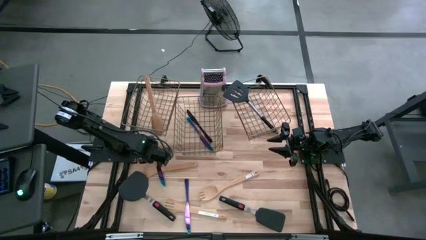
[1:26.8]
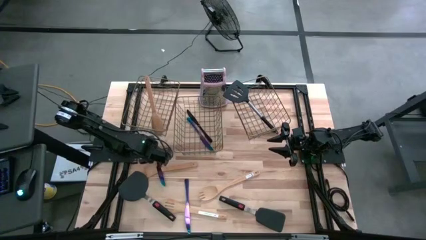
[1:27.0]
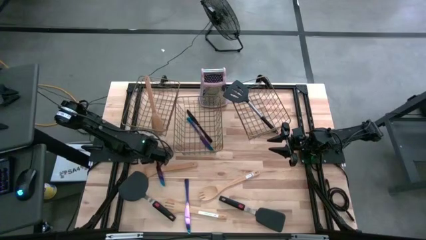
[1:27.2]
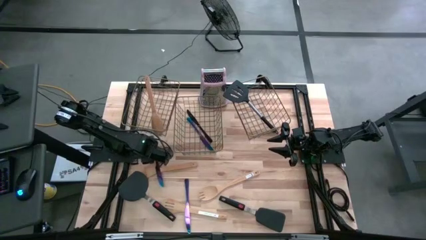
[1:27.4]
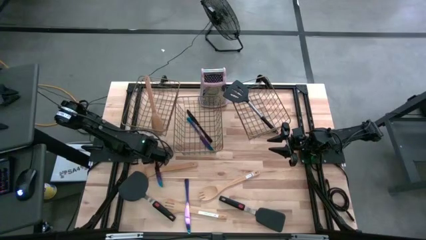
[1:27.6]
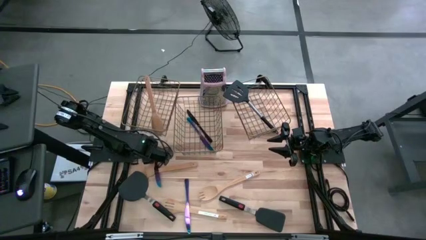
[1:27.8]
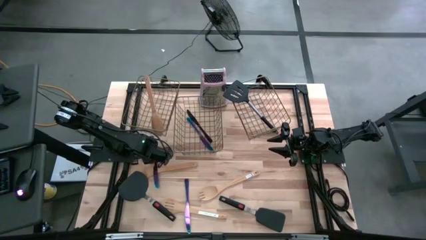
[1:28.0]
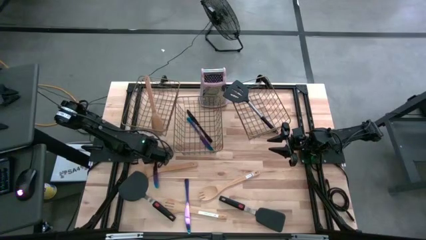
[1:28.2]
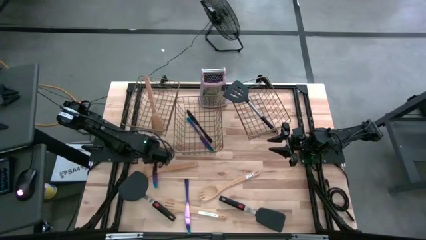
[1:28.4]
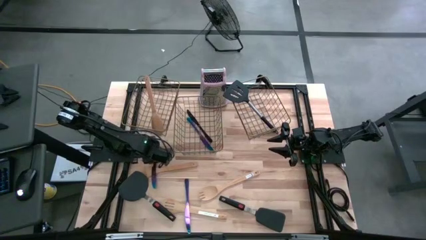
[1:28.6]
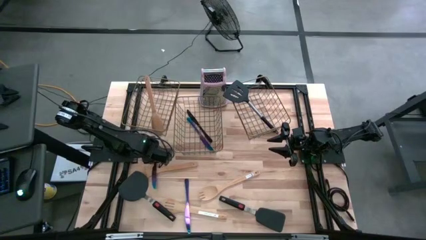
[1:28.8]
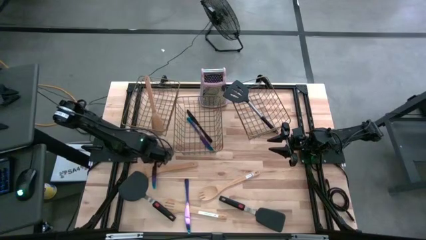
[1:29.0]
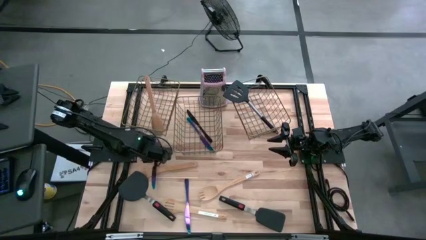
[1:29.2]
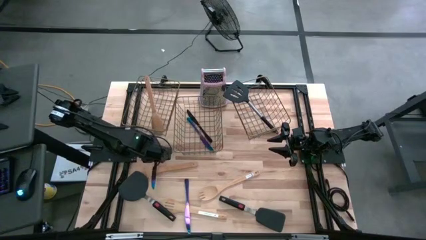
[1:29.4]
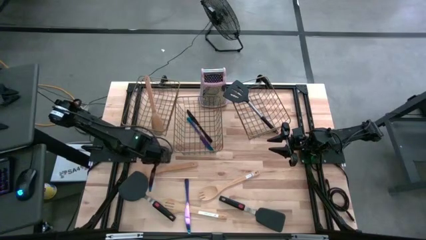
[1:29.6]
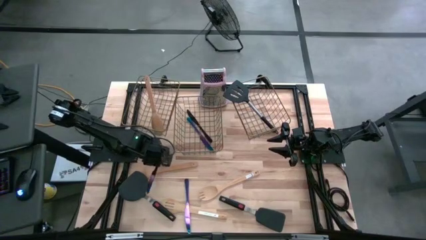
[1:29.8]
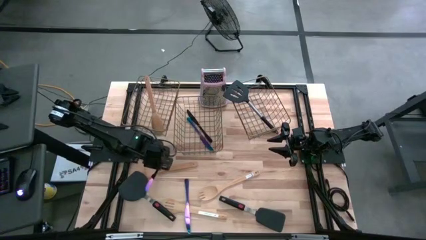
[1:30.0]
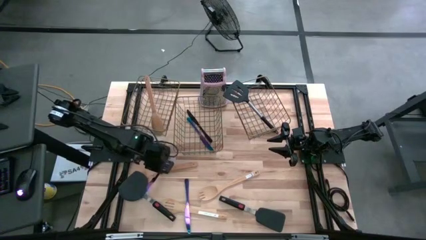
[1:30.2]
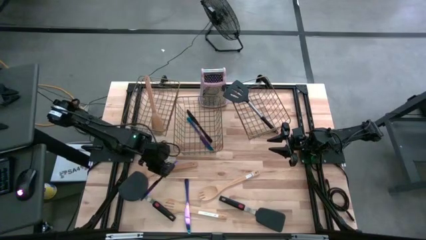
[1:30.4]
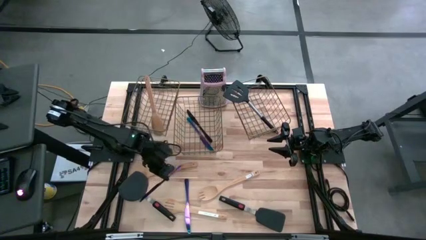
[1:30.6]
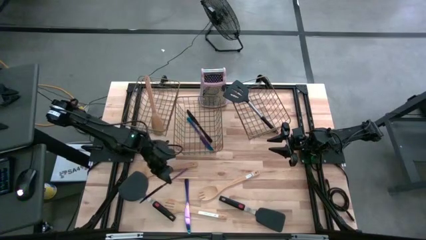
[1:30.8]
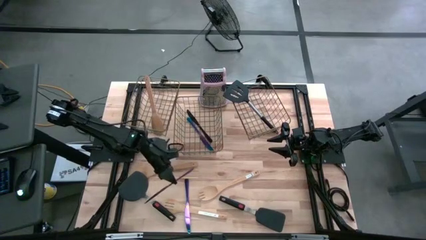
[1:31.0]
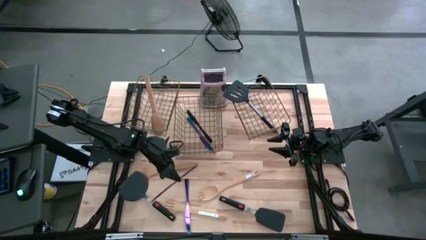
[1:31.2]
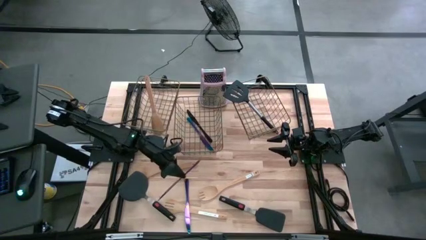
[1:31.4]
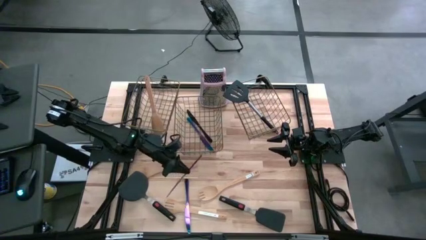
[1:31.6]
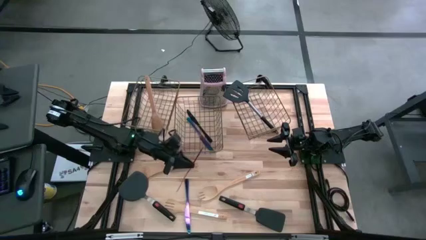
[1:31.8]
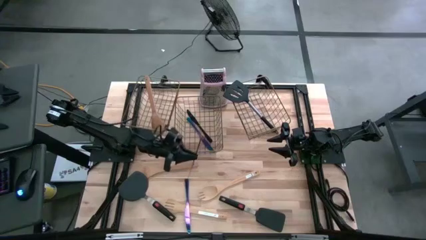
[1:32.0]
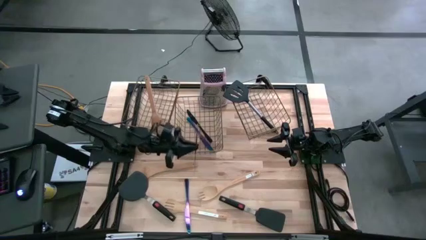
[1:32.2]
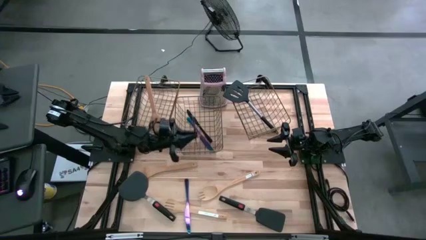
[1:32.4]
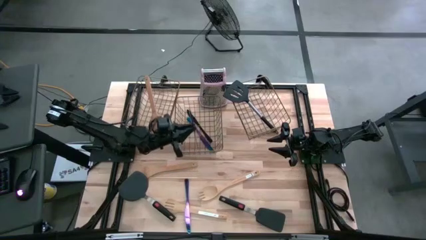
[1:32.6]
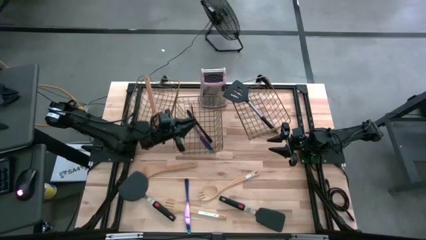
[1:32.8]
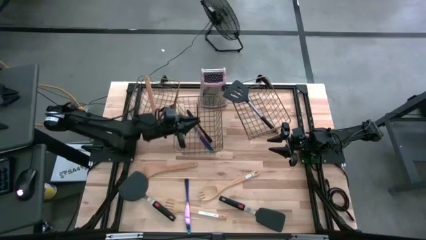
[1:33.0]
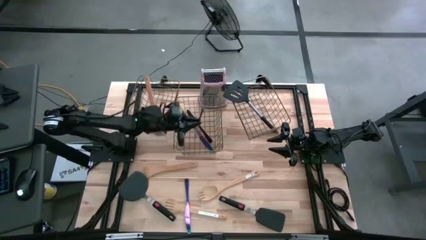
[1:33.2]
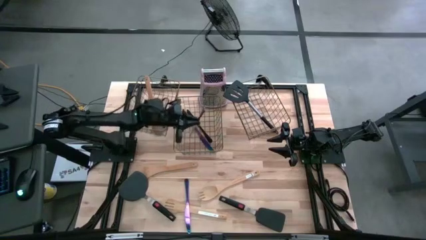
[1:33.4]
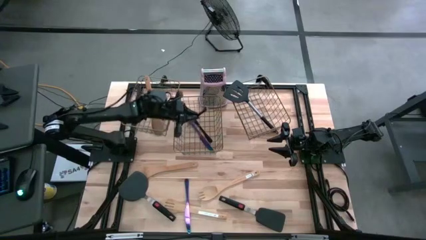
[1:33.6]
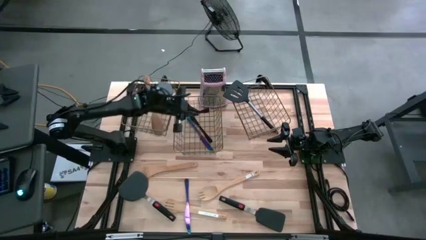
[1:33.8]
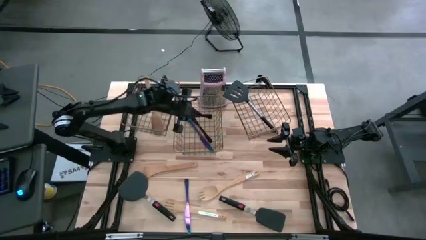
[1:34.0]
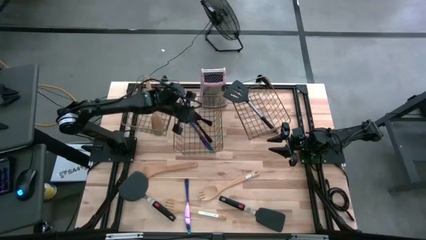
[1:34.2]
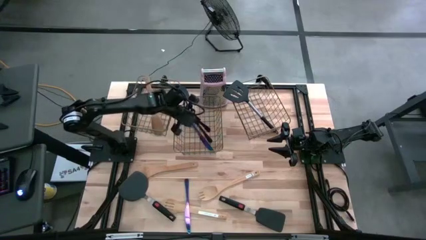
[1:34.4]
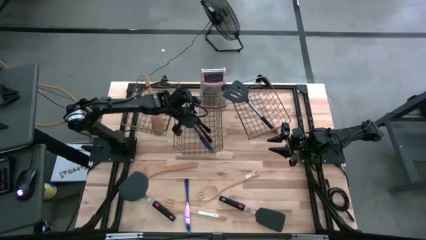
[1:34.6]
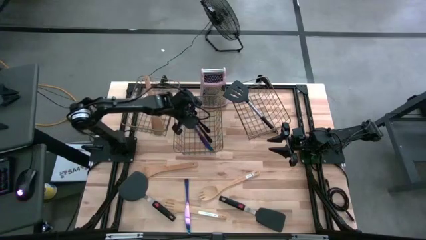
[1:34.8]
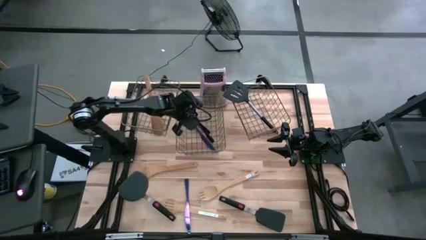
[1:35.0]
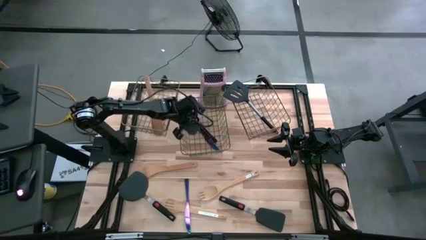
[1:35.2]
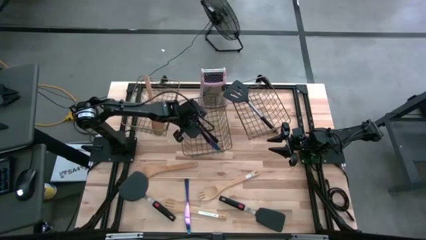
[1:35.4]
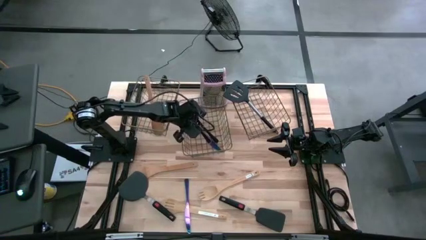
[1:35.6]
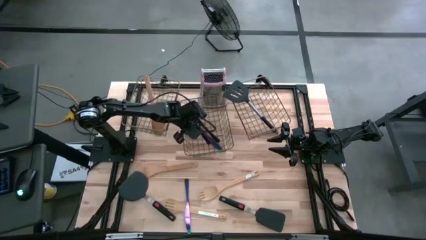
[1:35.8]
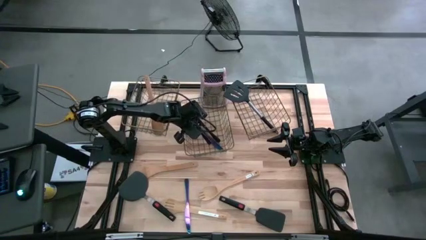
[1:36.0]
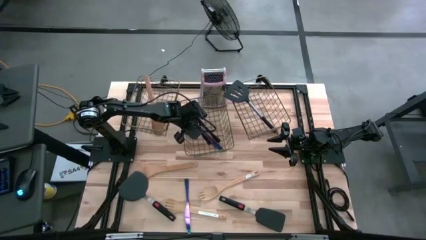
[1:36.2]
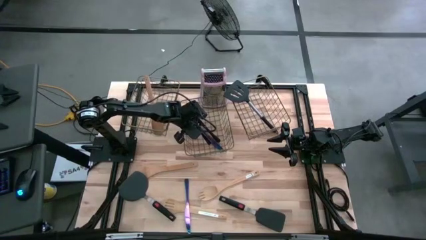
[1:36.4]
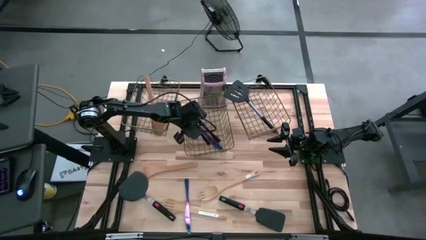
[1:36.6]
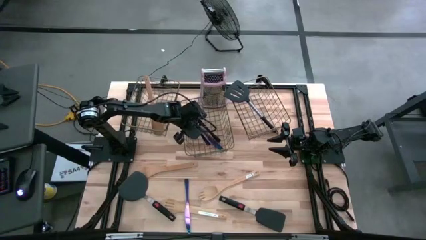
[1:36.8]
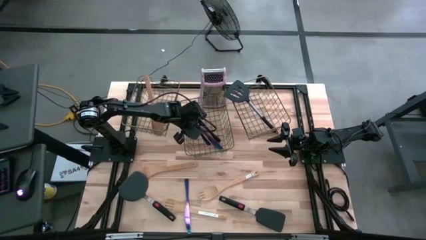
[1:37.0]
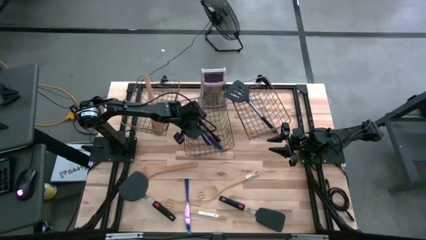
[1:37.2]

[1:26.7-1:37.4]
Task: Pick & Place Kitchen Items
Put the top blue table knife into the middle wire basket

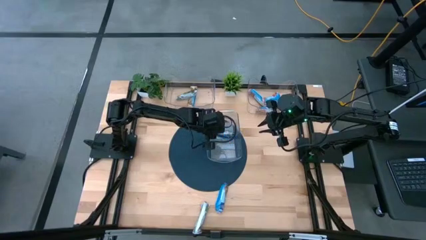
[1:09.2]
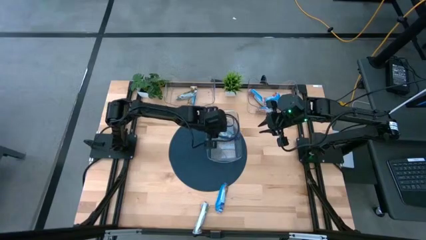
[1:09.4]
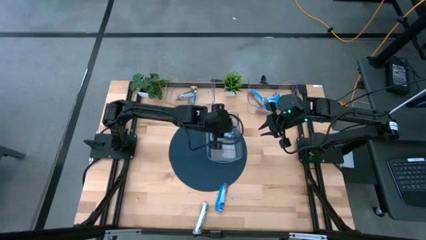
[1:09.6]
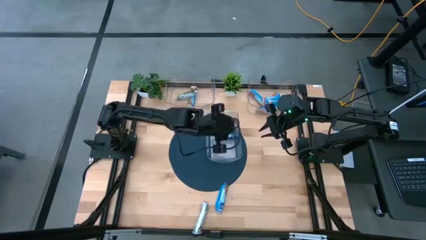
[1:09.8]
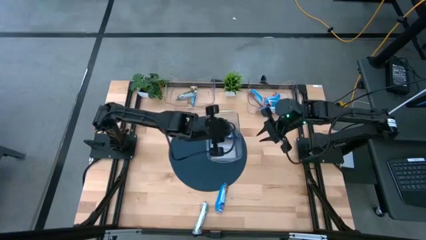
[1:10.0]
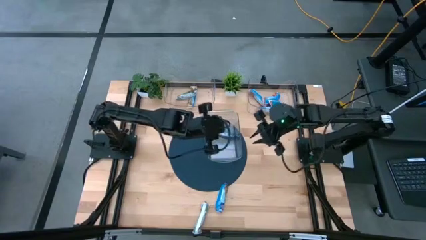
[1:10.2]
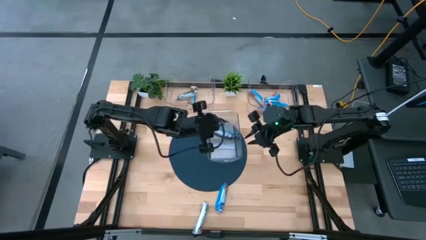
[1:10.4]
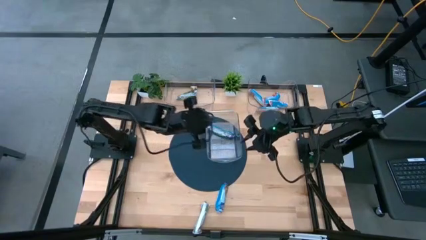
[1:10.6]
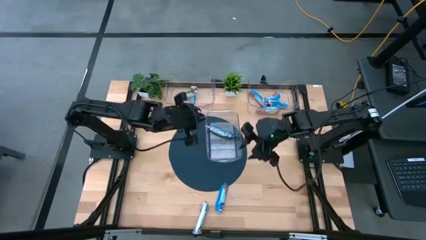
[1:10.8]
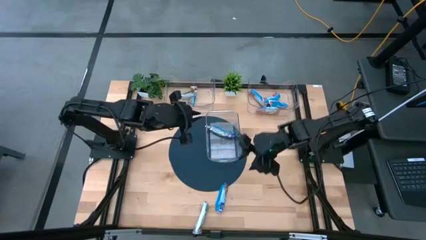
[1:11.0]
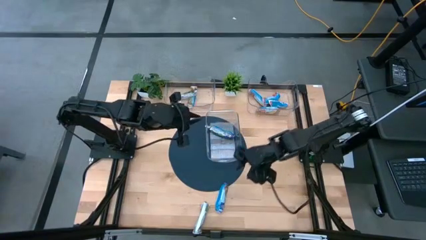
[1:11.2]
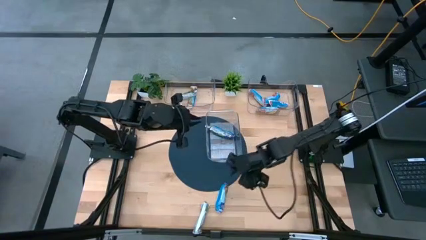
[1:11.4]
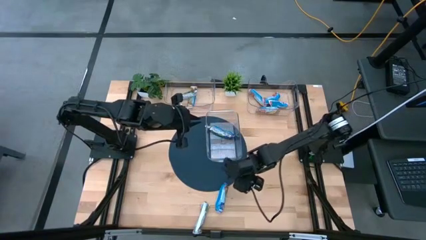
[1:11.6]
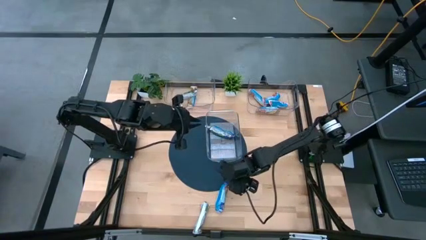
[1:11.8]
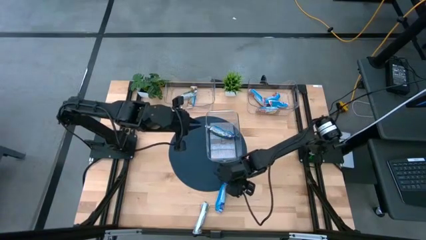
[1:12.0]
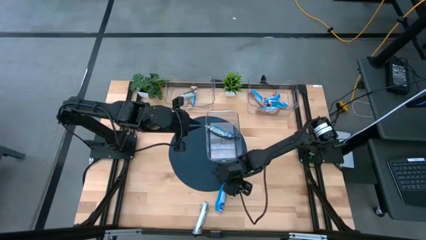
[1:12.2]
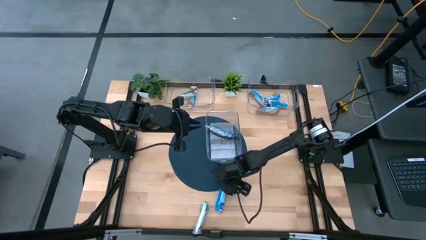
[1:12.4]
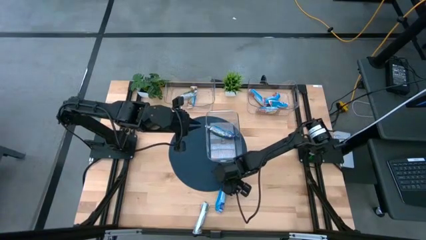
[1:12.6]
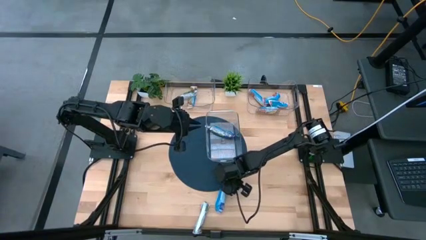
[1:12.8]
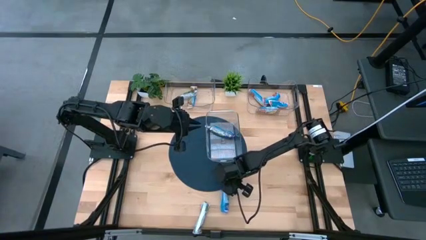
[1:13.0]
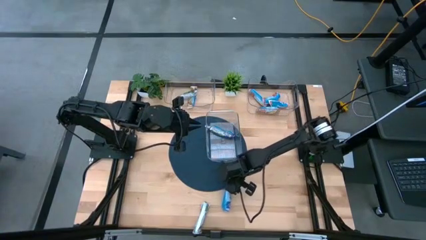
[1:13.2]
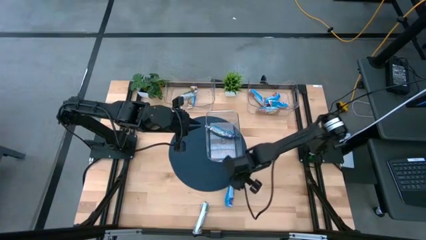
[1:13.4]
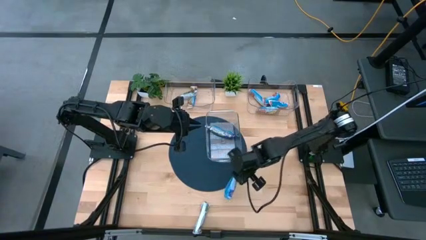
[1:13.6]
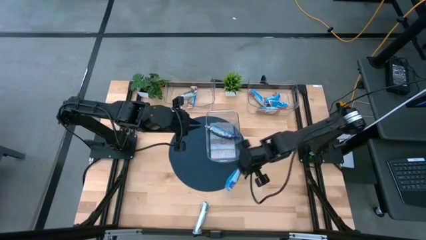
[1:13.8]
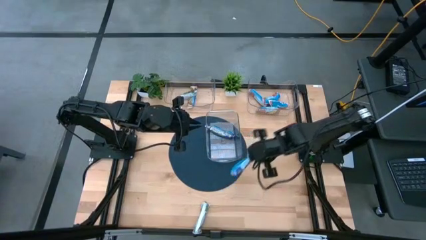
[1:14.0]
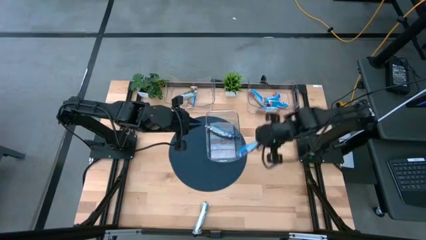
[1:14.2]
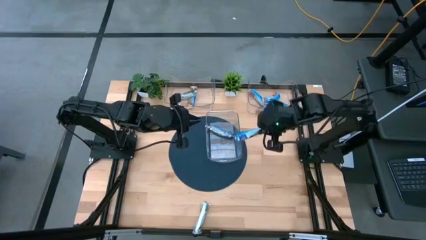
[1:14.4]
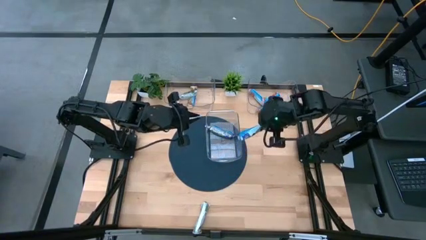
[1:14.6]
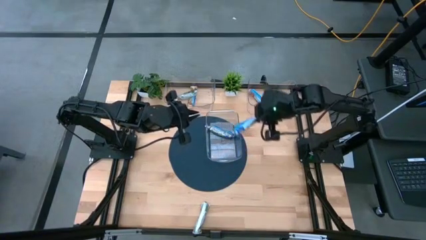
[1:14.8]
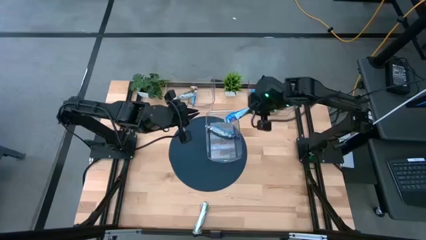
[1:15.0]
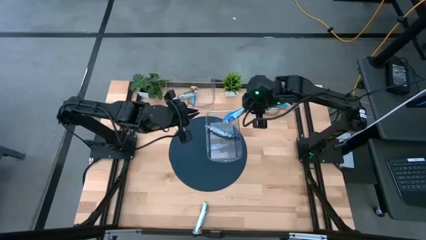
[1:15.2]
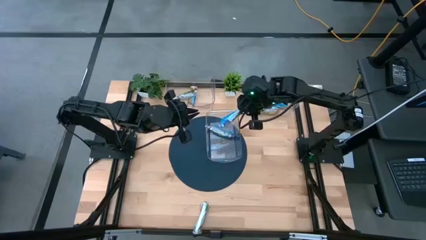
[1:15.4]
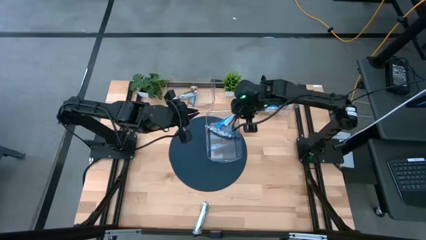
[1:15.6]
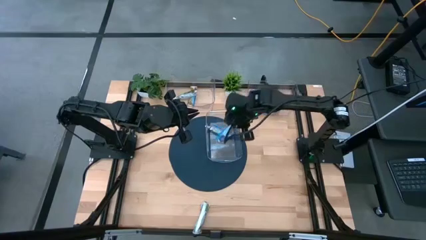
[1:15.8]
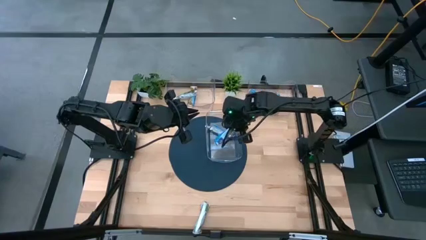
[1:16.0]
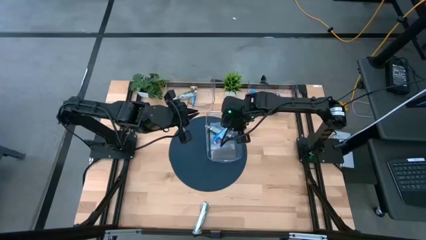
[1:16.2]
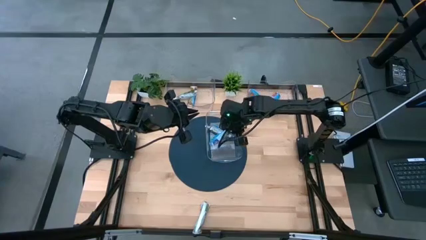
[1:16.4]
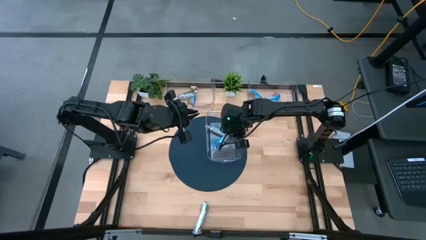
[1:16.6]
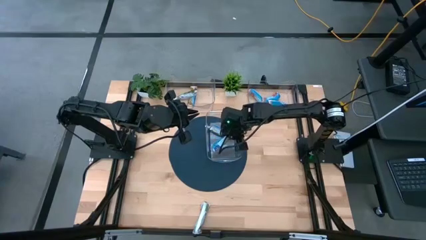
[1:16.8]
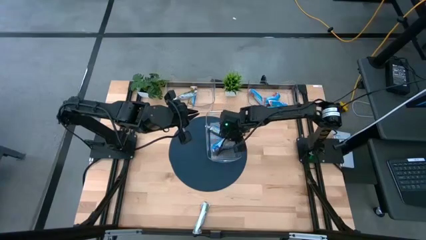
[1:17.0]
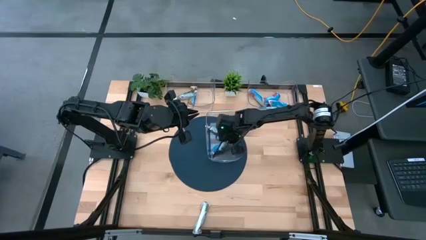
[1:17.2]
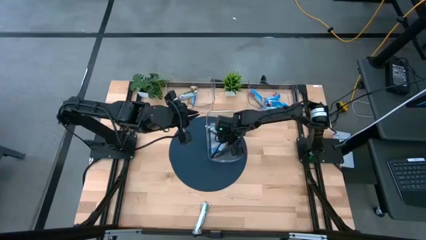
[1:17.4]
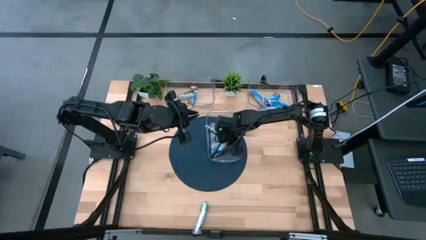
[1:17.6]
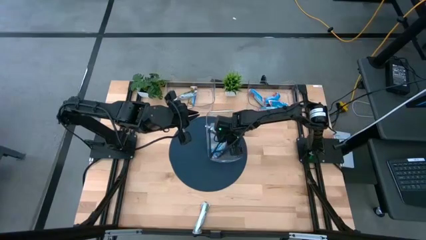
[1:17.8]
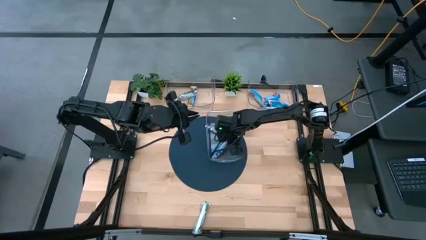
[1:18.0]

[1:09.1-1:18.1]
Task: Pick and place Granola Bars by type
Put the blue granola bar into the bottom transparent bin
